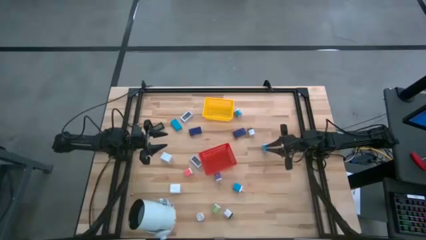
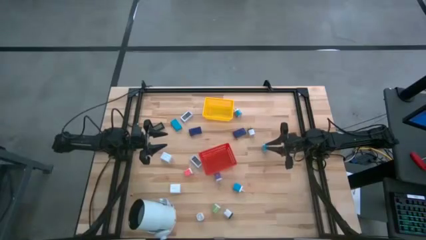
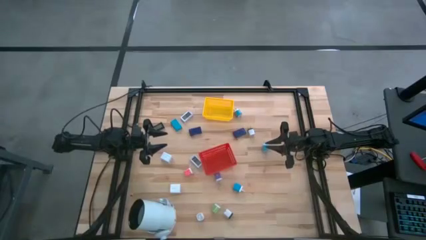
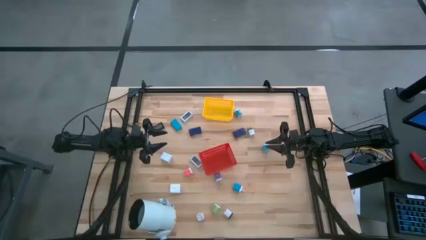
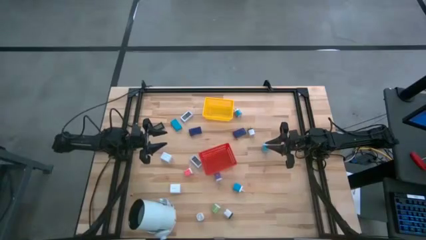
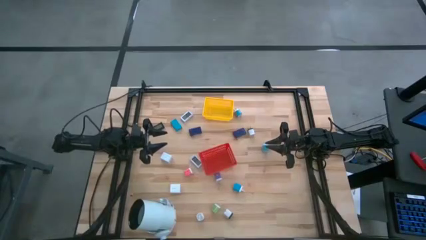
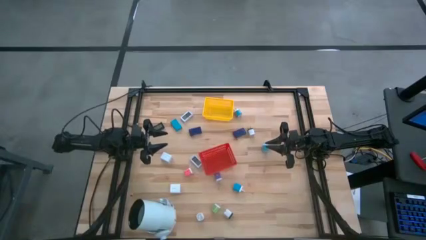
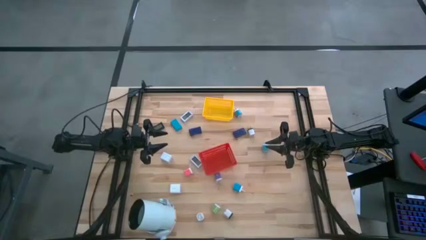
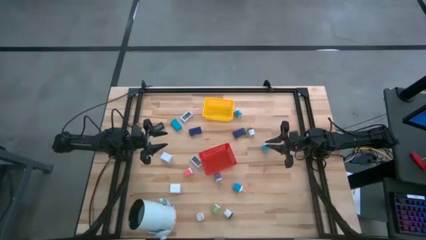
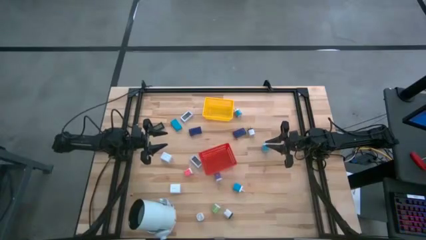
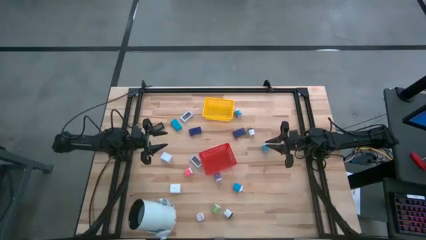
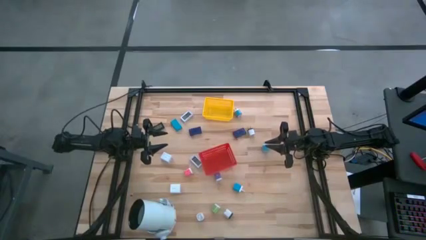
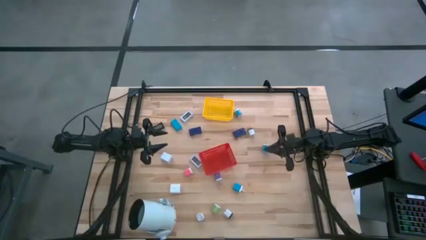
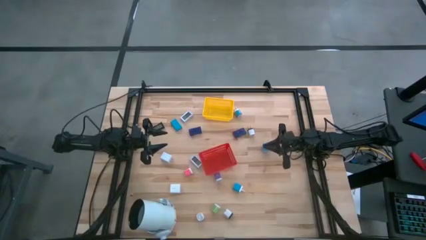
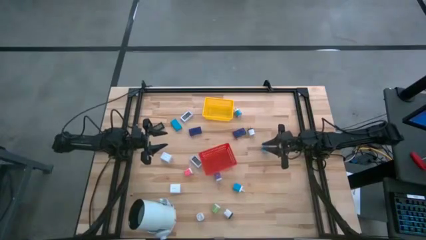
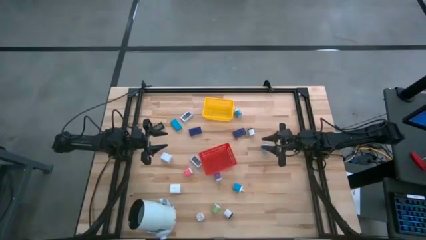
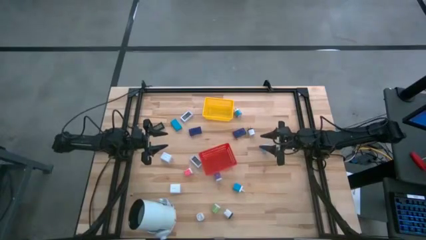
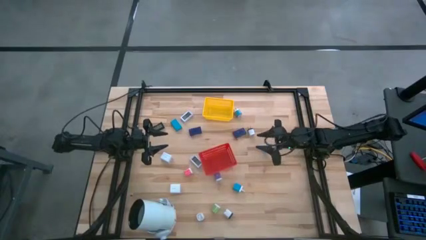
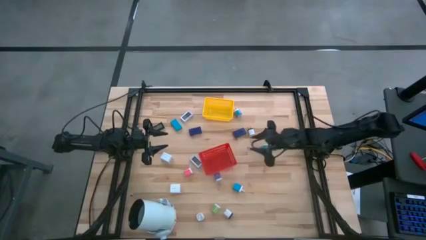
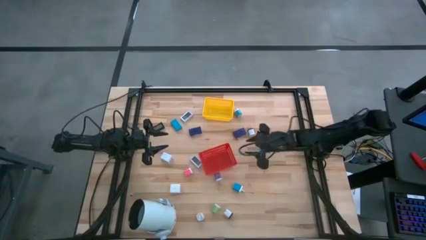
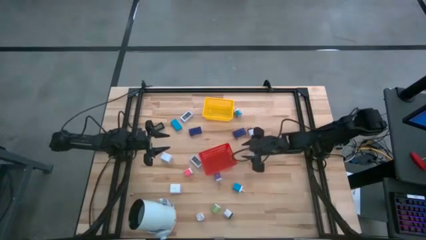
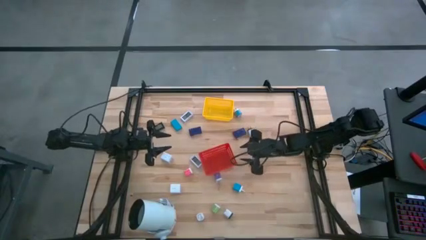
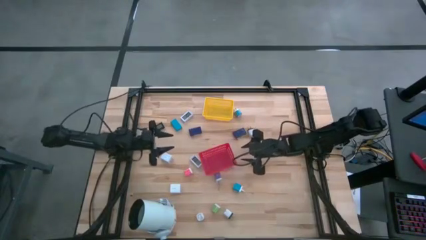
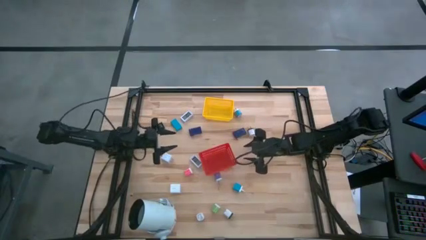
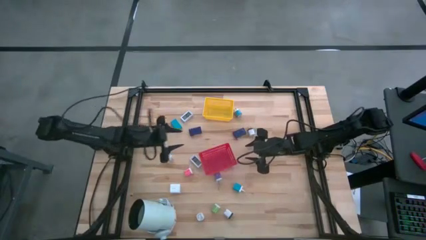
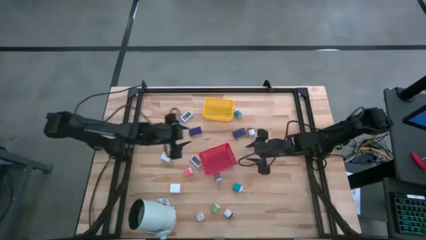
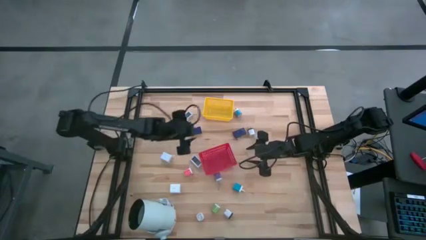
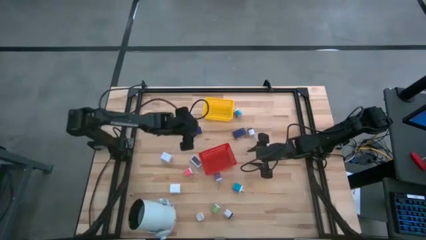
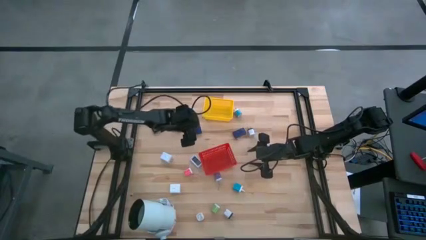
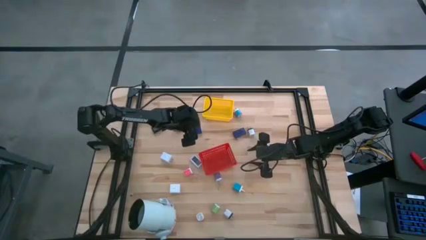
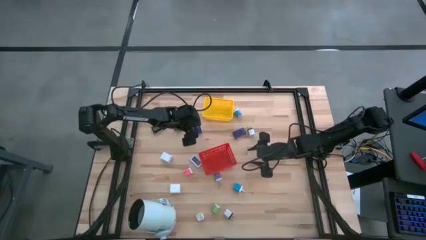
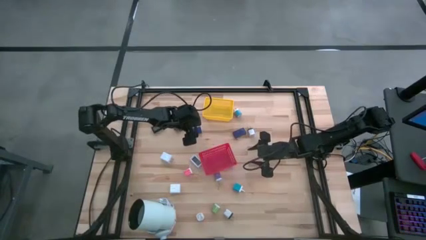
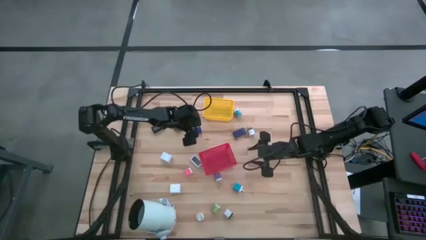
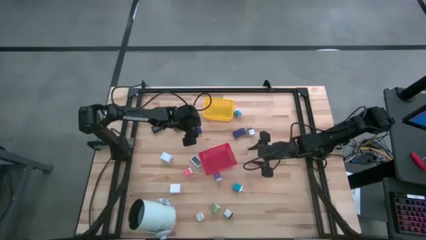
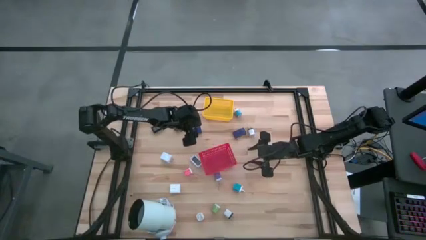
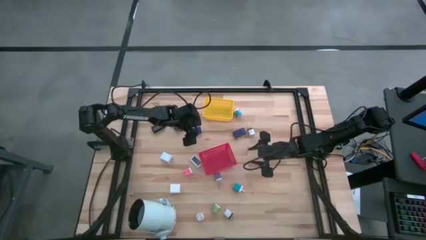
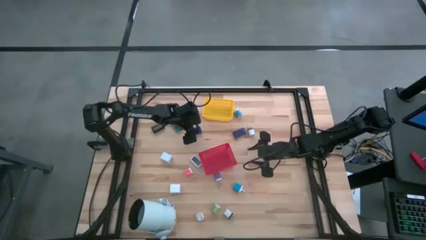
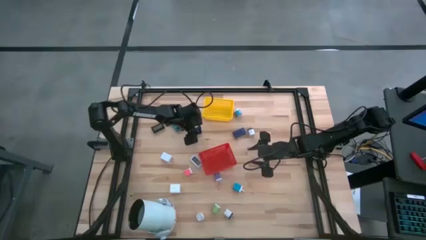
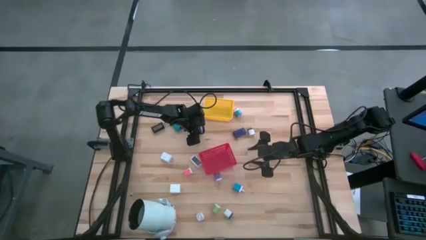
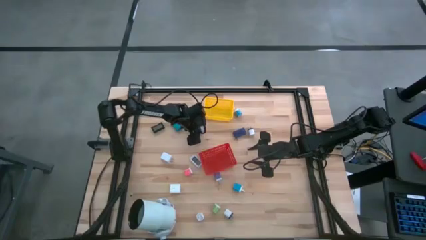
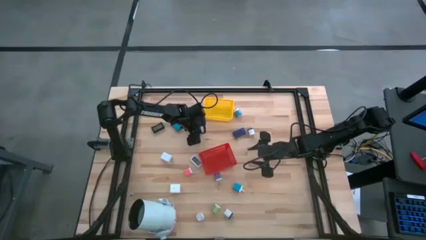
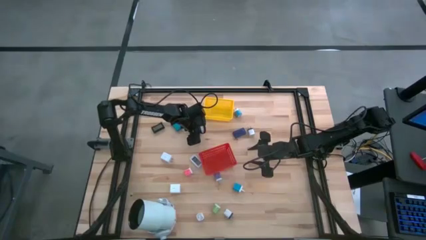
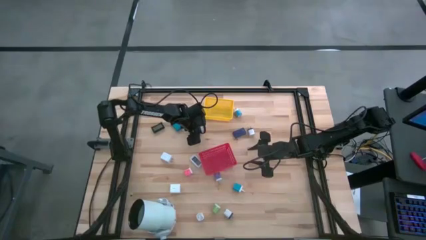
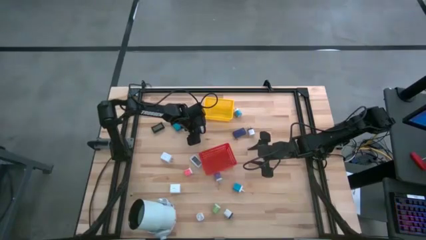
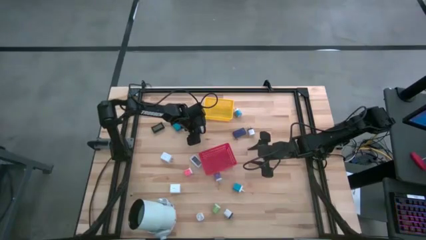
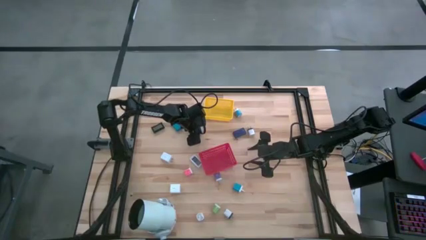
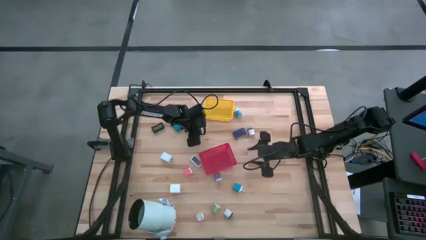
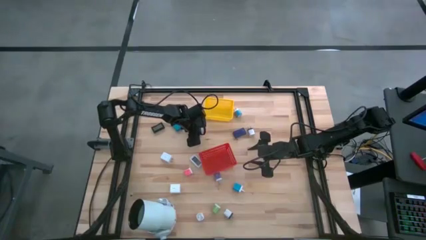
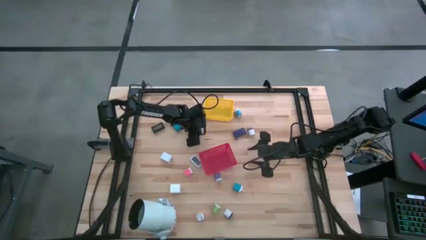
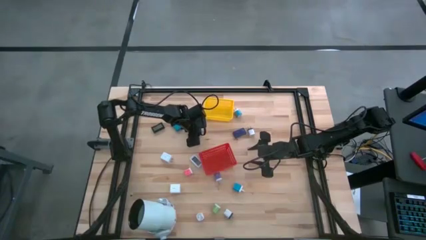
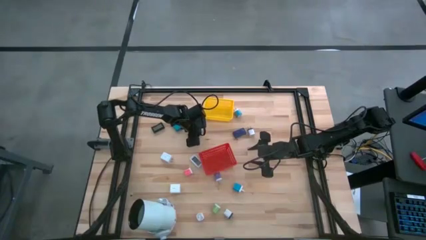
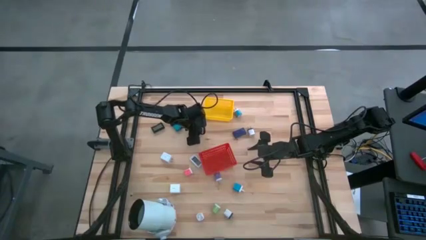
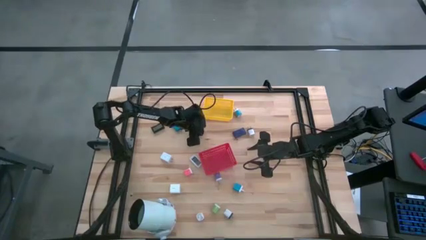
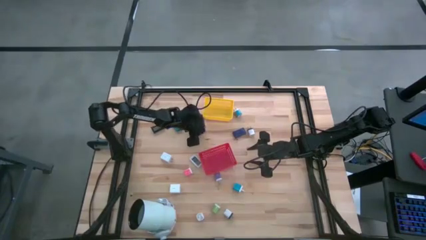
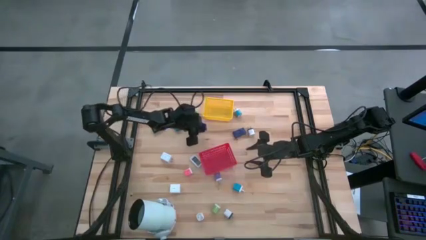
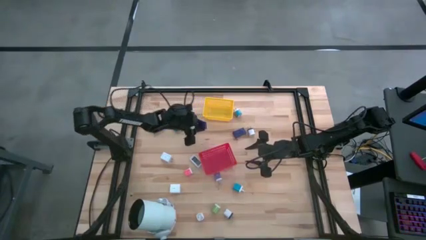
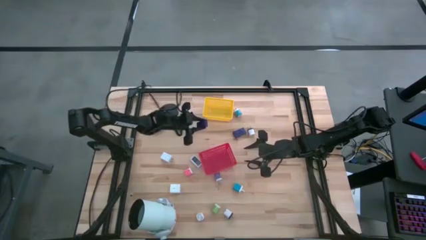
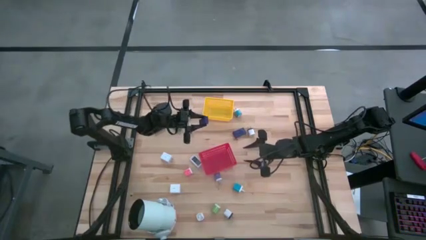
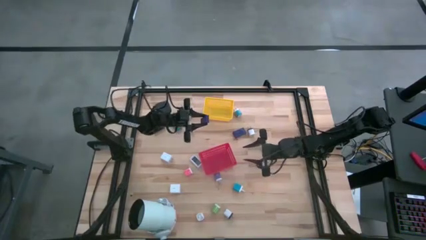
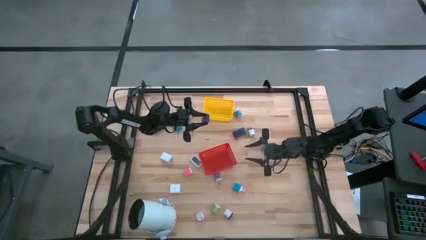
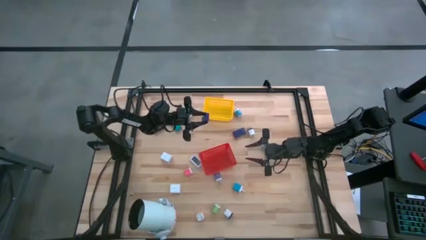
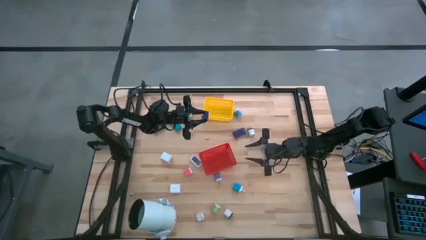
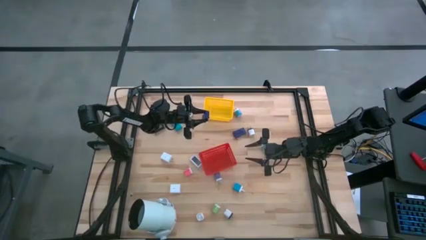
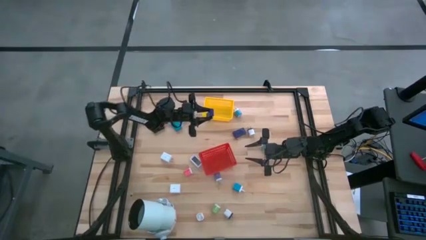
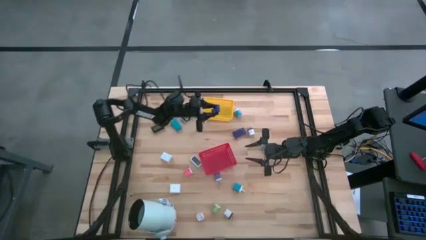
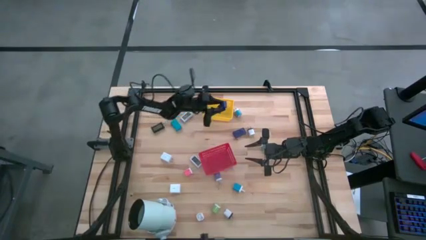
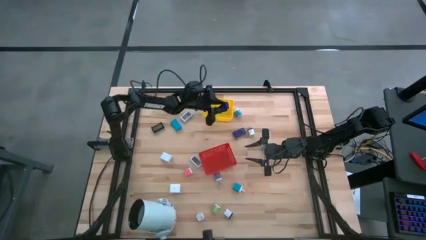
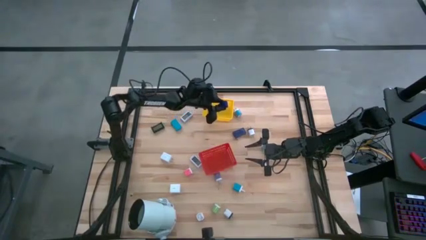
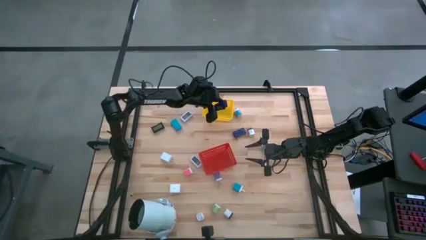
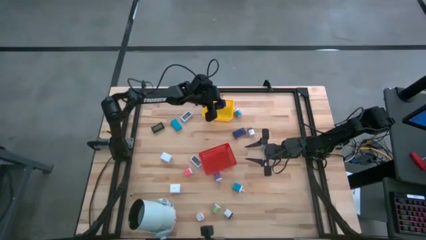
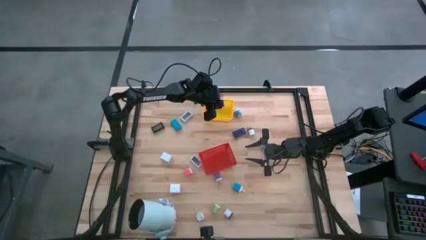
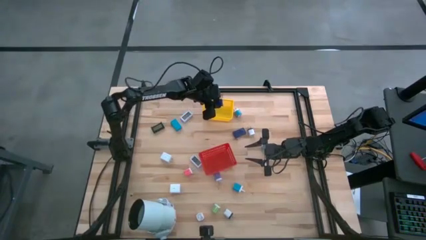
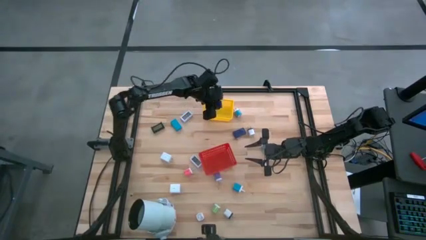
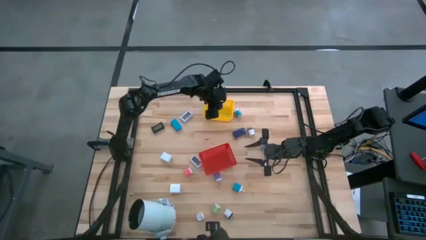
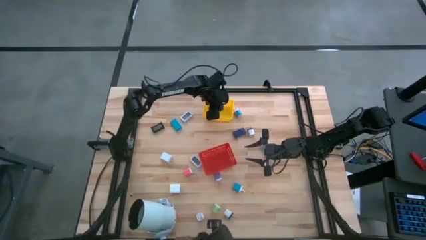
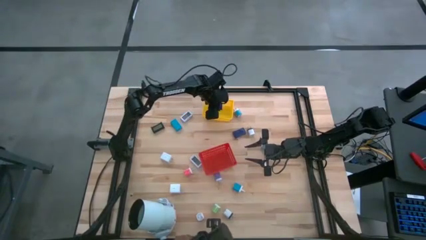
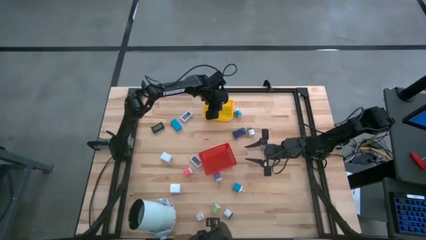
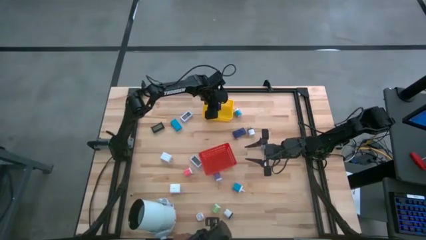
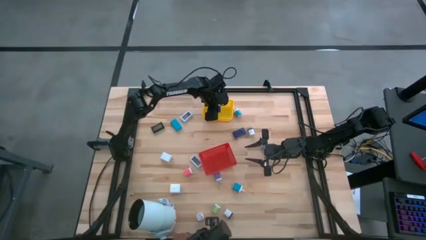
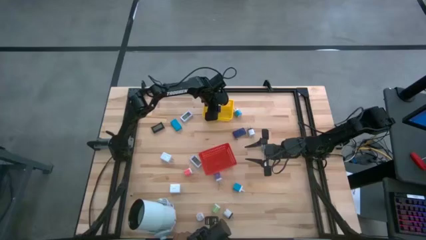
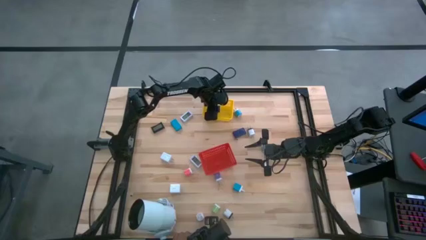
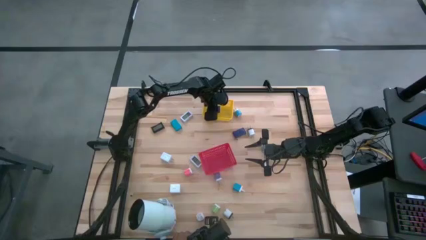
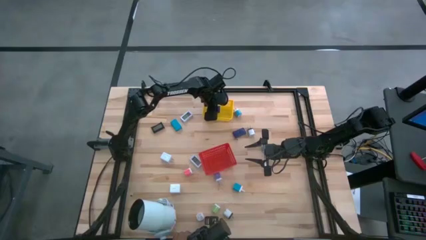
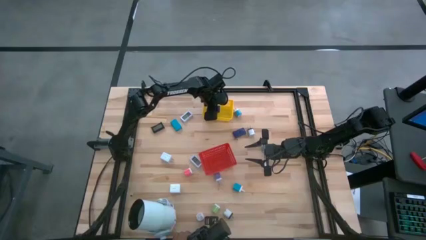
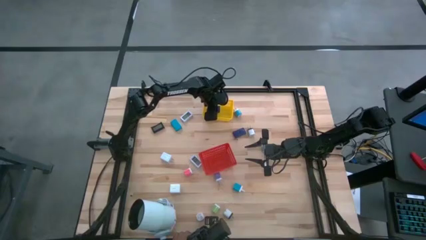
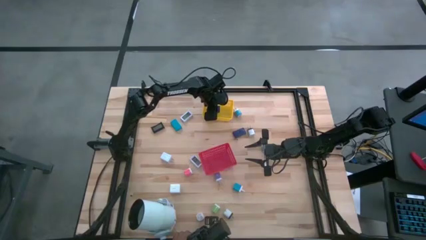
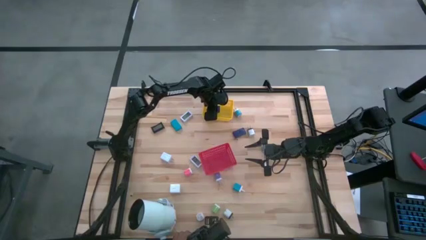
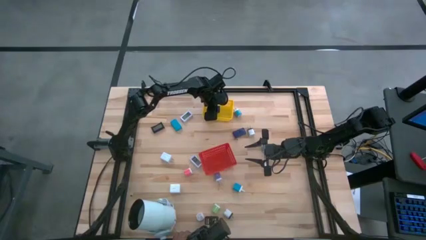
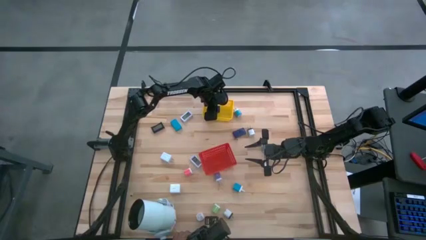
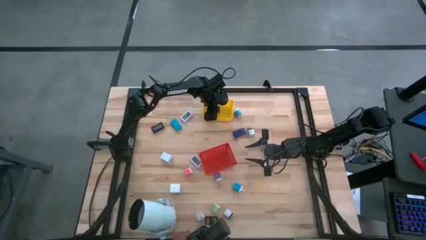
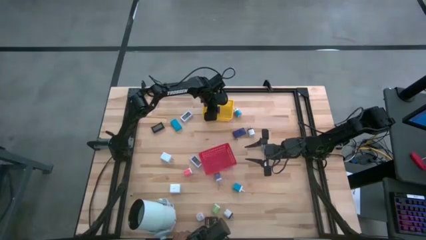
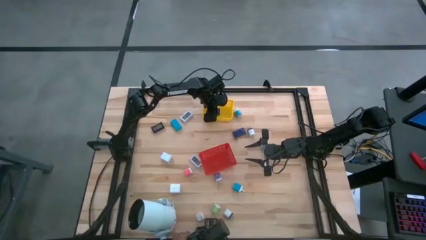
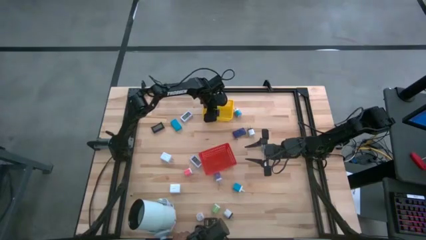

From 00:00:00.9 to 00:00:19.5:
Task: Pick & Place Office items
Put the left blue digital clock into the yellow bin
